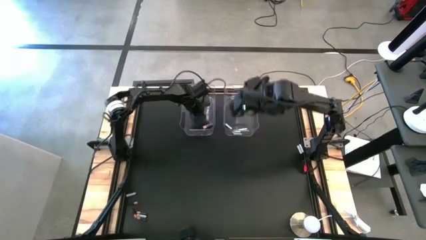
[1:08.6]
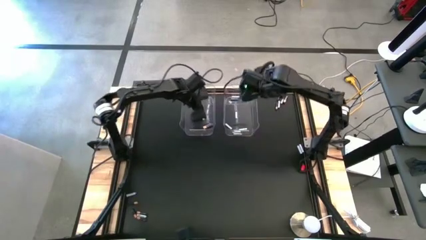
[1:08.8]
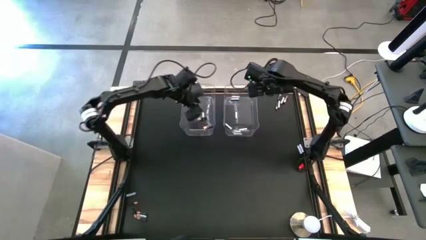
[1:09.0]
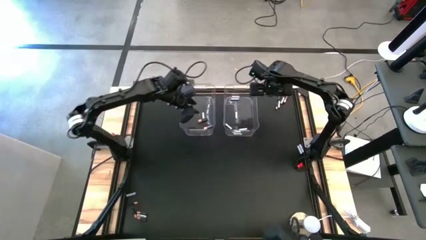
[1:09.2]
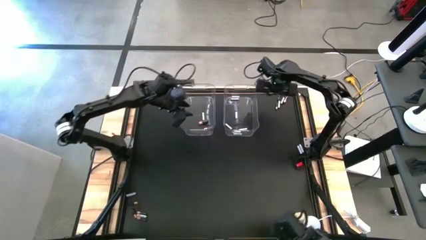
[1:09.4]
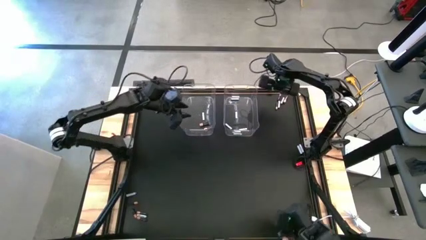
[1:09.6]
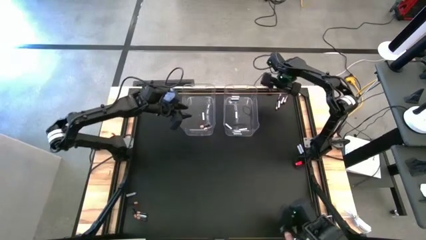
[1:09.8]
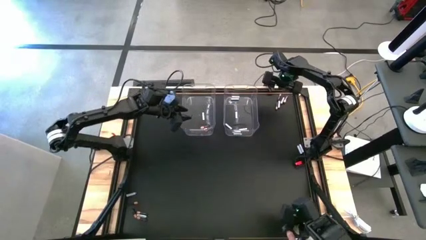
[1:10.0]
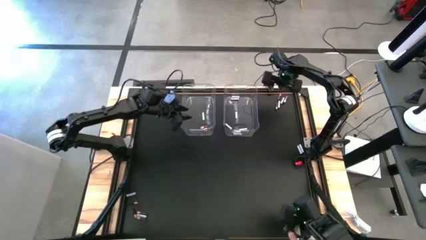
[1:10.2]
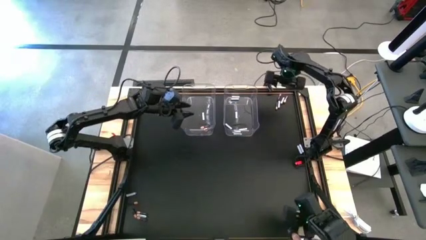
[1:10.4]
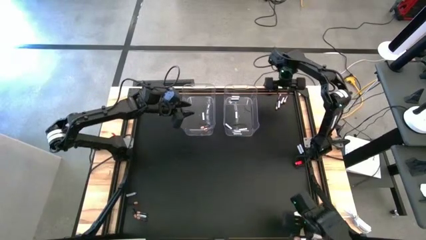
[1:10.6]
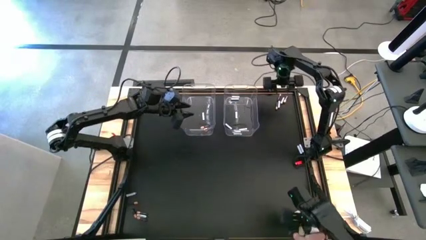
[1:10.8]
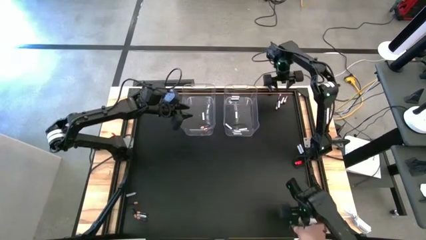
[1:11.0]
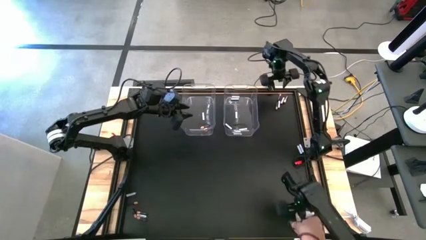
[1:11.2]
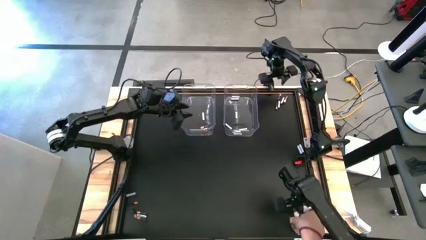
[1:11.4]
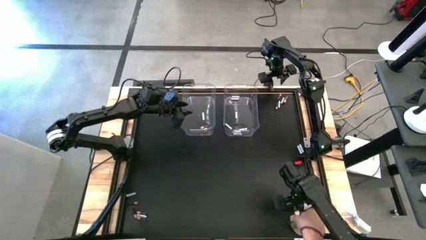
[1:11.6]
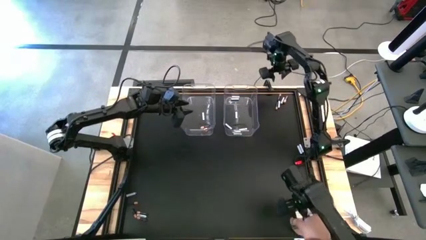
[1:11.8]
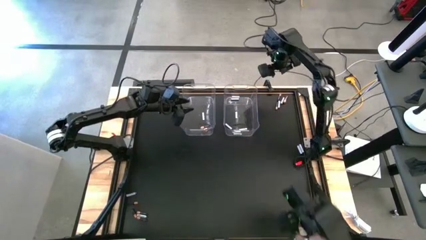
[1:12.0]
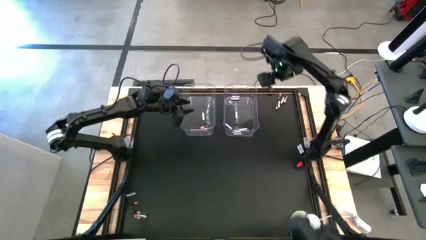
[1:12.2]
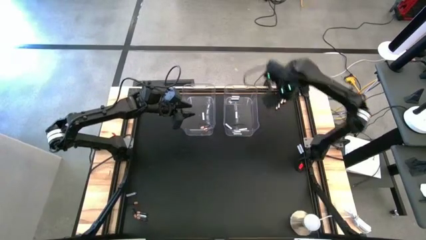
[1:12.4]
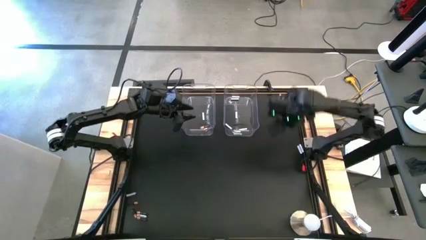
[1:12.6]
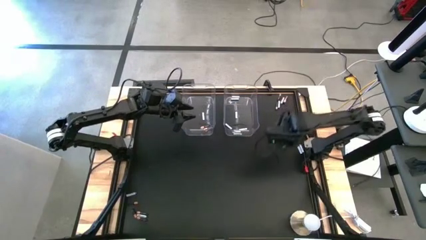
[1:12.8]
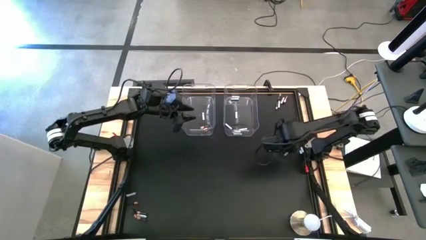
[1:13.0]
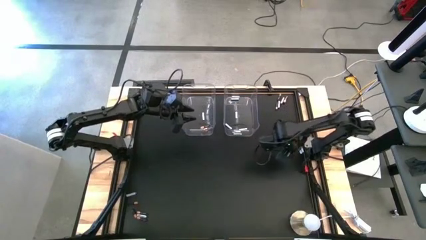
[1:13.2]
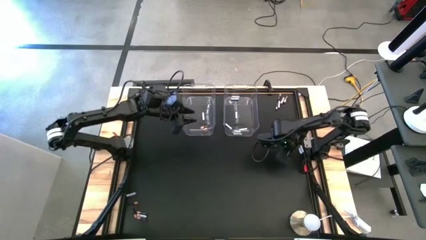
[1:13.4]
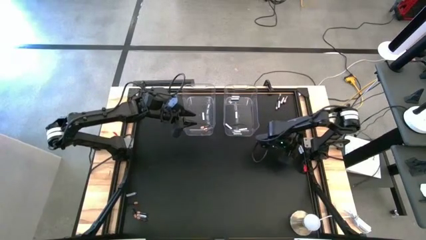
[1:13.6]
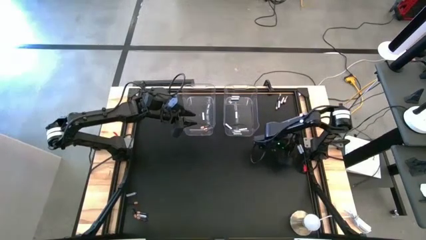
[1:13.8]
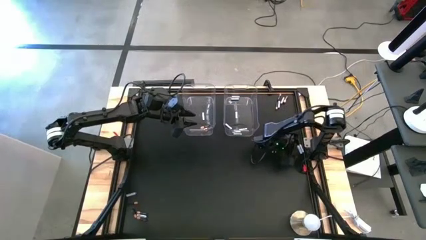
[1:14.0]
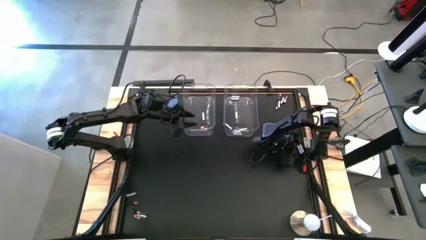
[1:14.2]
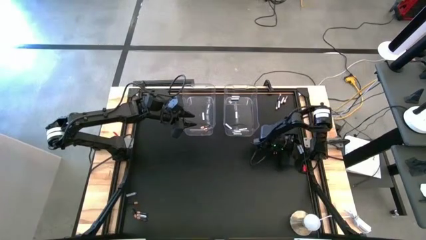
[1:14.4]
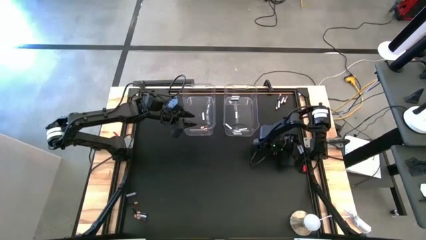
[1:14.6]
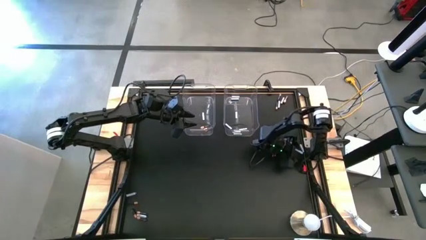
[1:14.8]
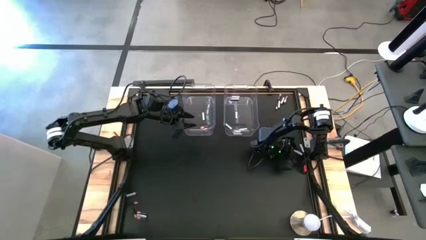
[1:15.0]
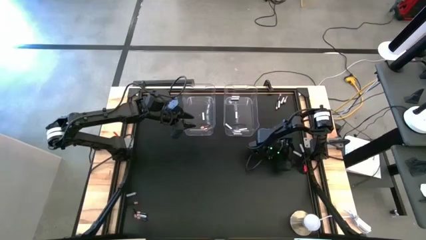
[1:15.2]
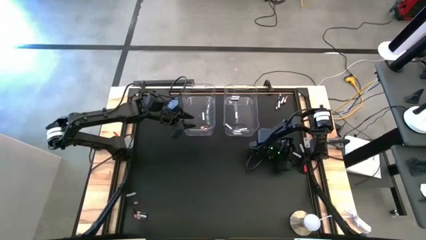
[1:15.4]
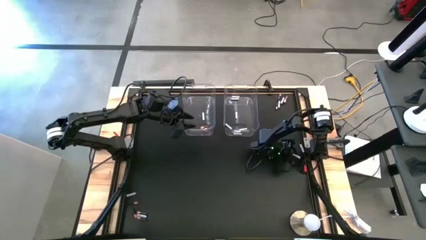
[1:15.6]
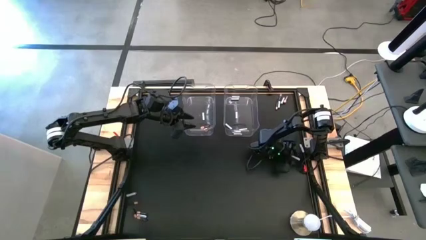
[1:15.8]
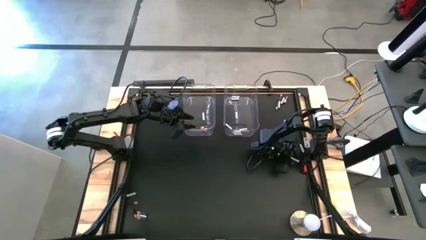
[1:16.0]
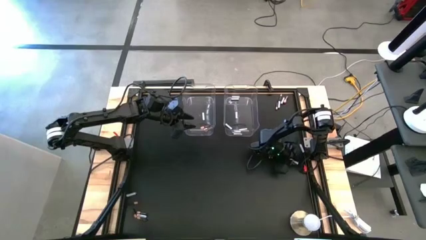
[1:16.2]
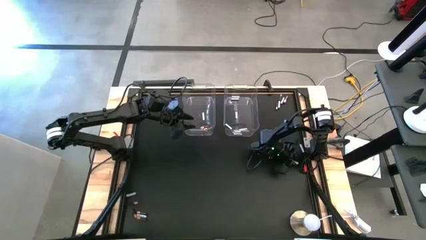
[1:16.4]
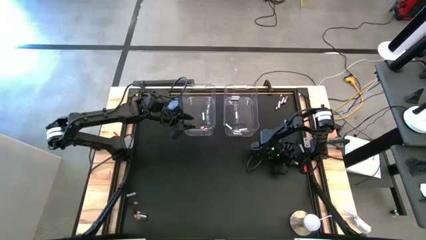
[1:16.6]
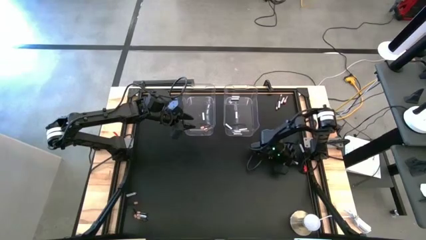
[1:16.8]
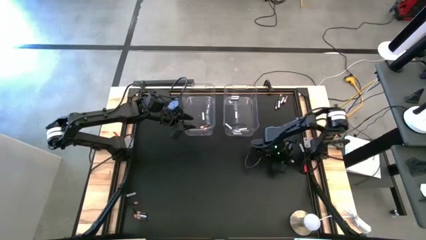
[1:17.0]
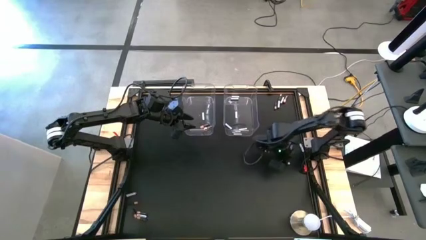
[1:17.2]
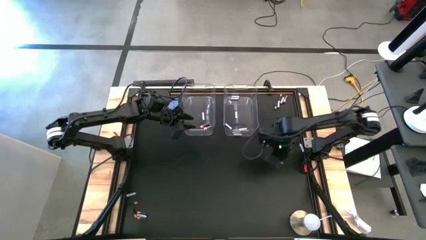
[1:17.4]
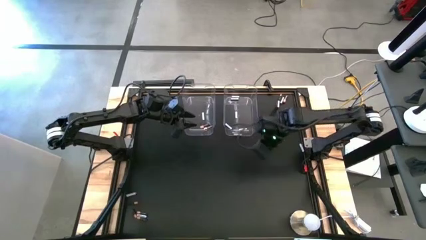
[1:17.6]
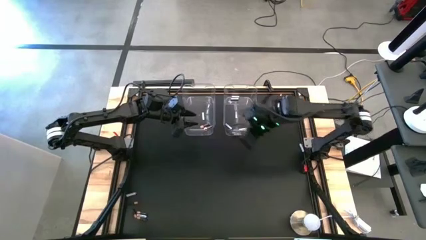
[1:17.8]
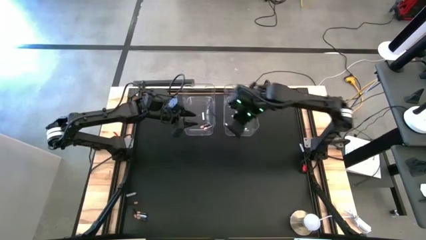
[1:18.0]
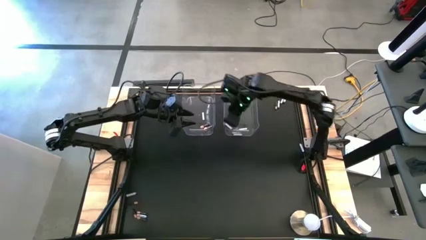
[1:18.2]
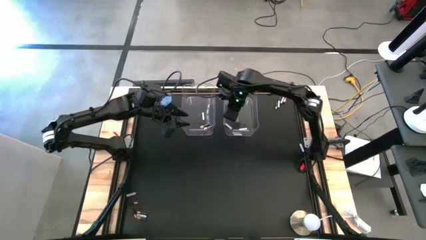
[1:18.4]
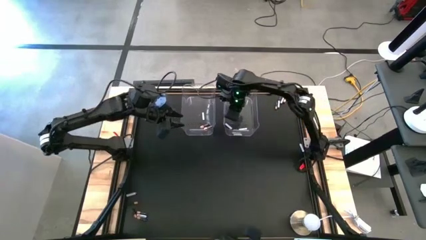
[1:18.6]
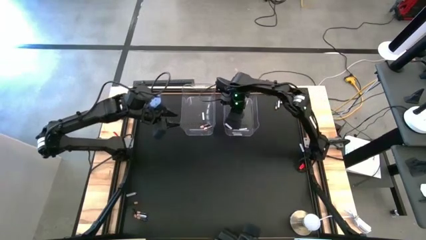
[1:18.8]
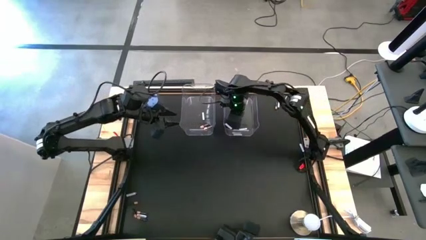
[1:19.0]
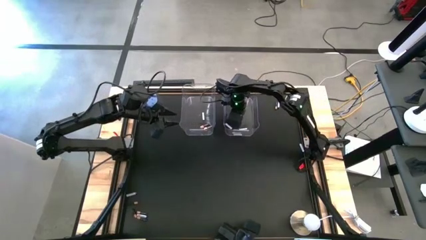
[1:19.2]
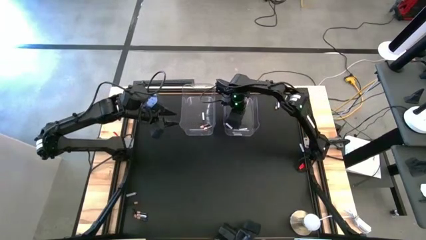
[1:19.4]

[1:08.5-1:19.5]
Task: Sort batteries
Put the white battery into the right transparent bin

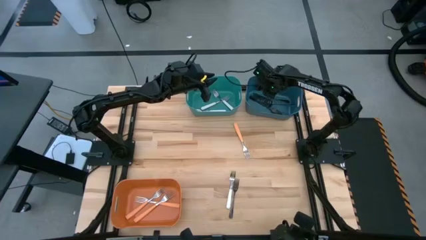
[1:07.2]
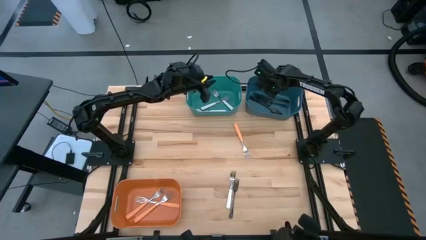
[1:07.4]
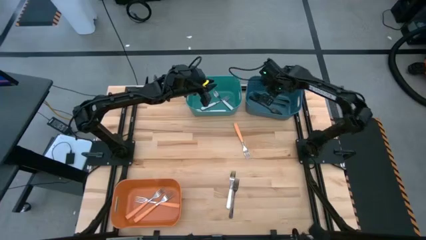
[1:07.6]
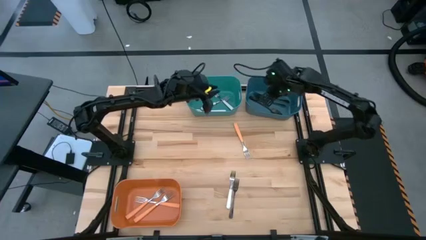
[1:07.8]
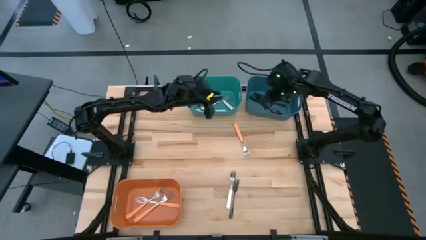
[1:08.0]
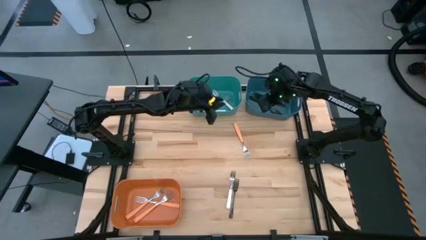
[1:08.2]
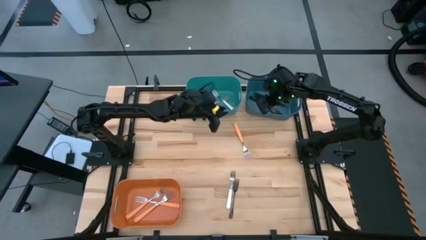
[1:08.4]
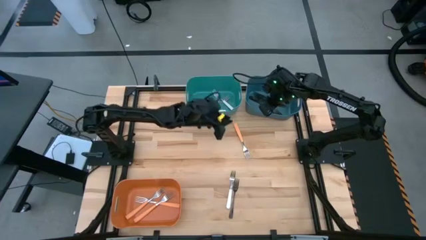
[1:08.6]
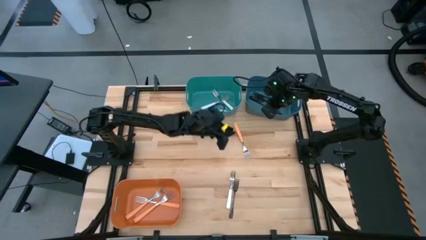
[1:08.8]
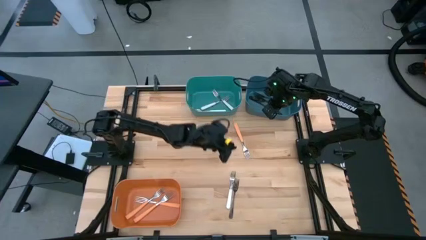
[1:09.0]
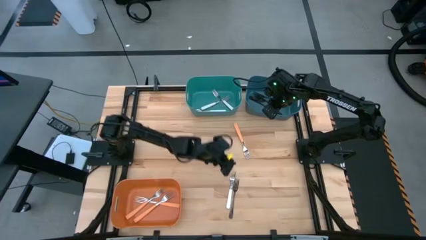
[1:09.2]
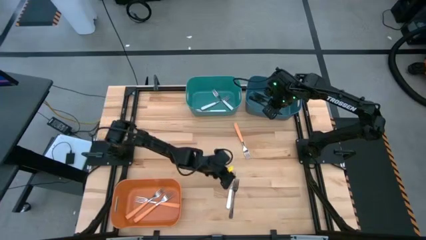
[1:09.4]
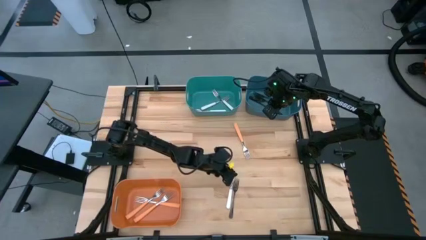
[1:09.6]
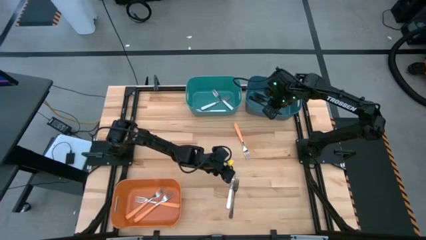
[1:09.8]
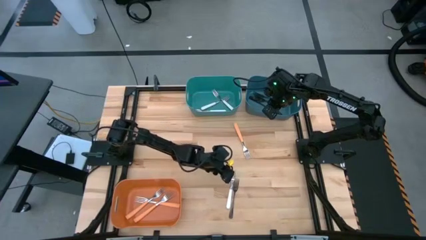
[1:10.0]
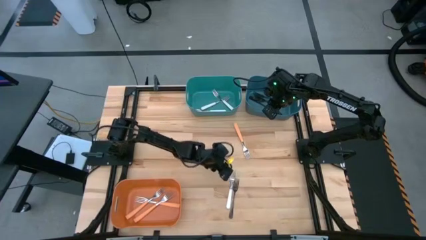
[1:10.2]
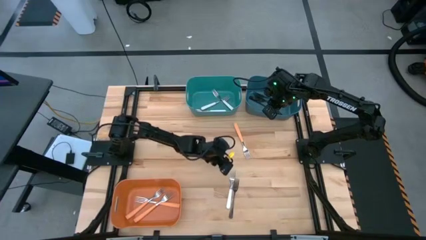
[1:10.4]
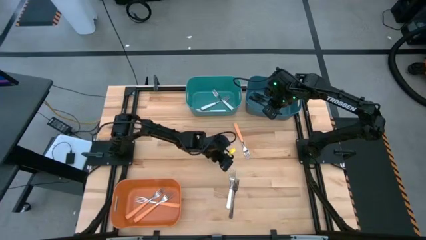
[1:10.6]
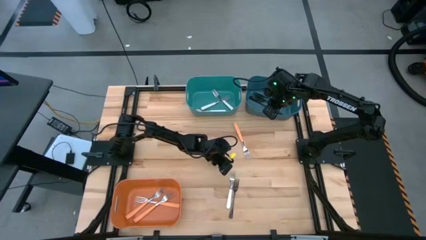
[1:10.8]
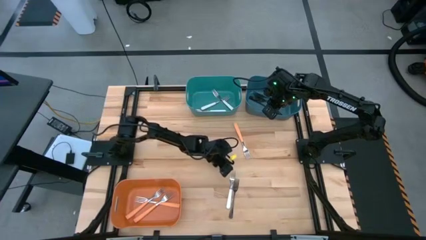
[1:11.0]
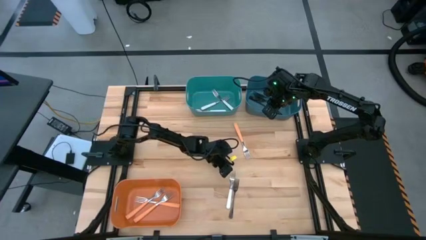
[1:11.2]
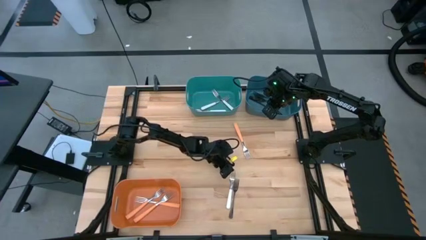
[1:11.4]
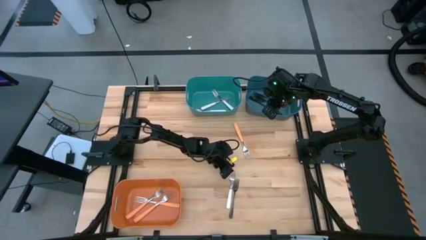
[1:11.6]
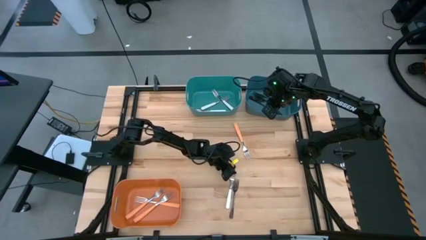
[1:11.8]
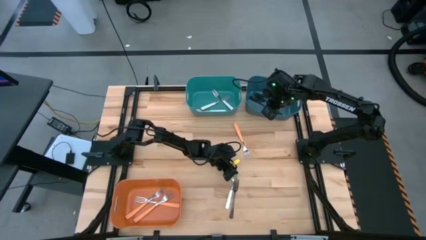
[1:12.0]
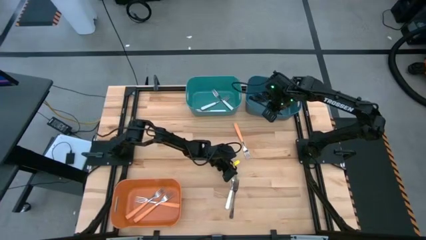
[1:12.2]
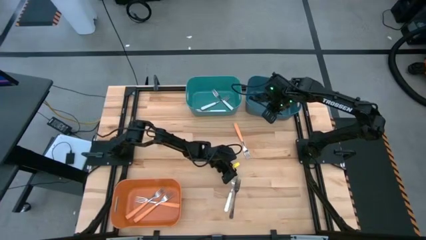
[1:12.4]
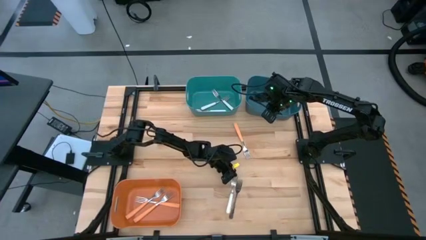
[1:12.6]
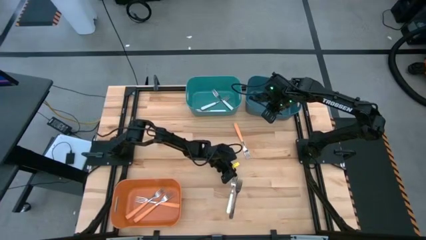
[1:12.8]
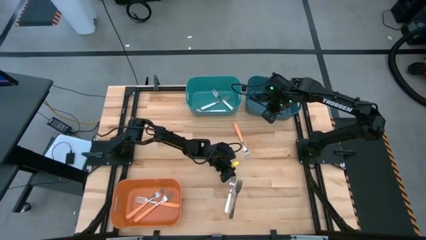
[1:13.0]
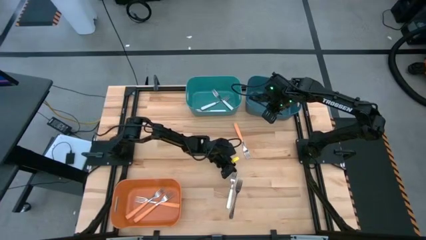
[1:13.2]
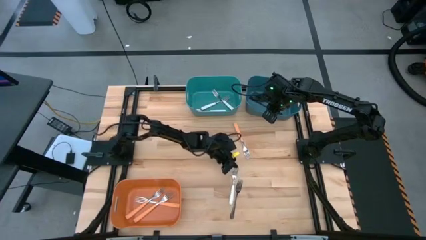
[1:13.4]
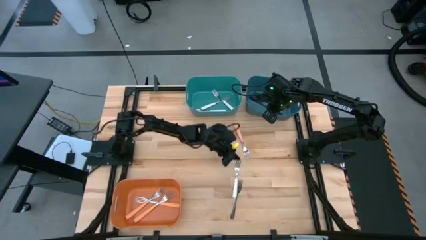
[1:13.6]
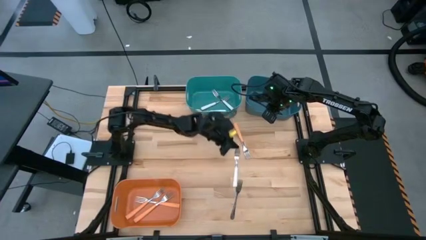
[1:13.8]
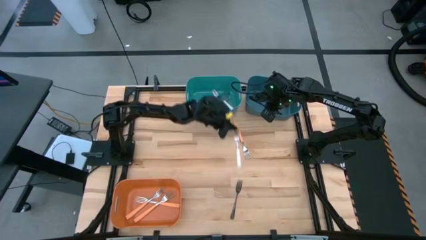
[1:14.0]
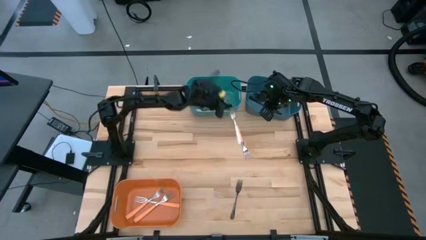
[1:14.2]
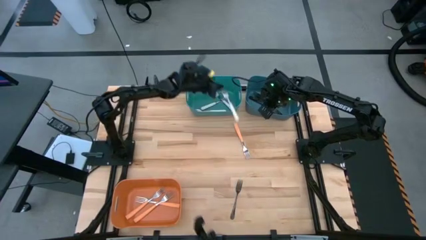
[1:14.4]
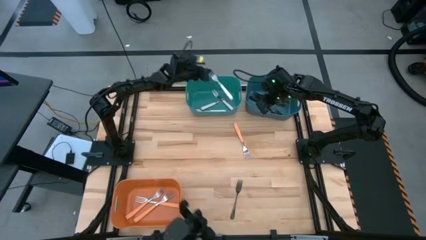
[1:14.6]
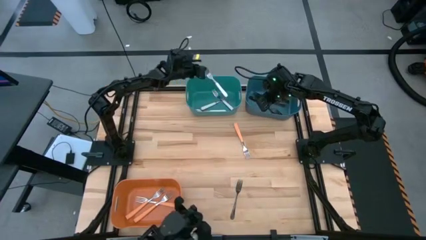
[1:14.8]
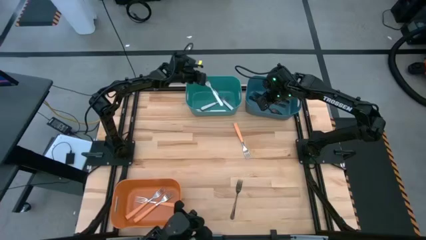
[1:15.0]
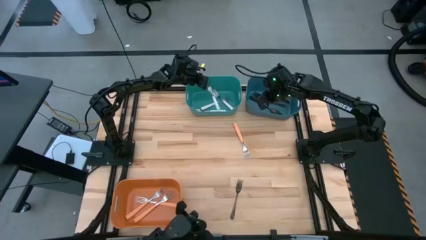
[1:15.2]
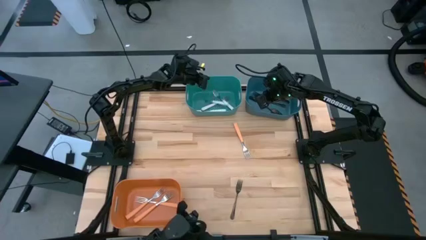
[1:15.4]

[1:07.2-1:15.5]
Task: Sort silverware by color (type)
Put the white fork into the green bin
